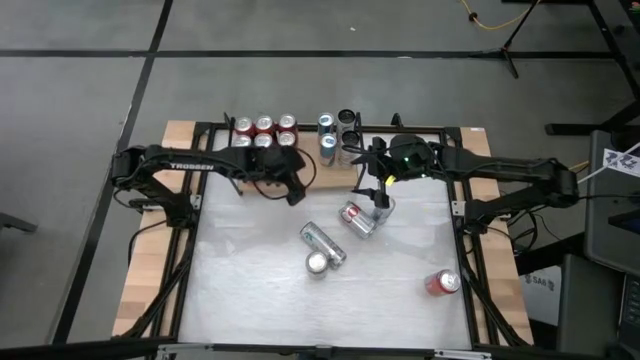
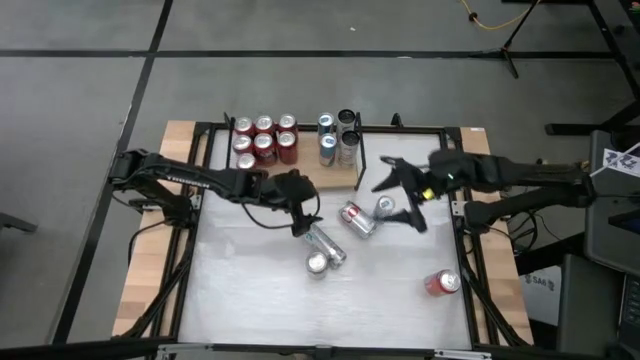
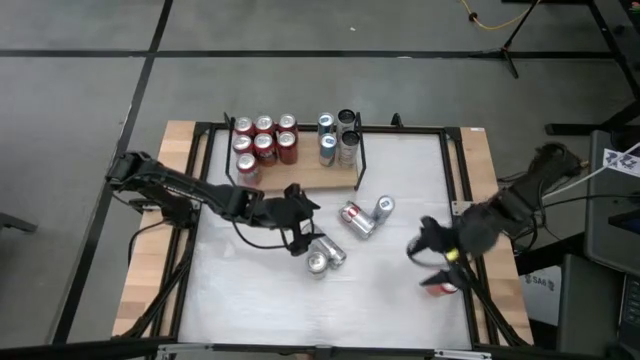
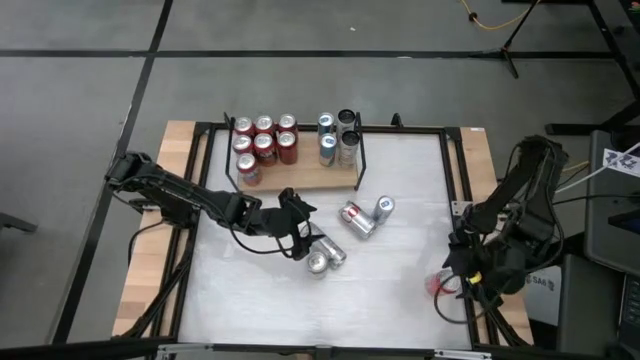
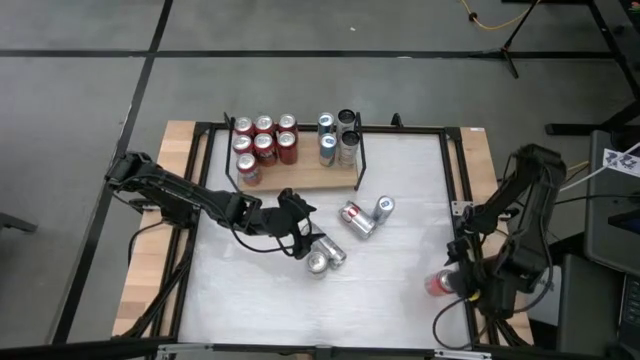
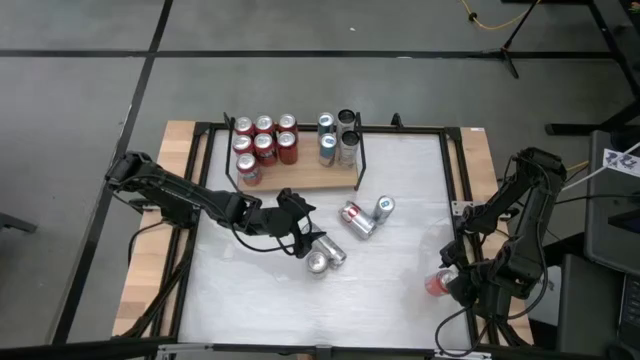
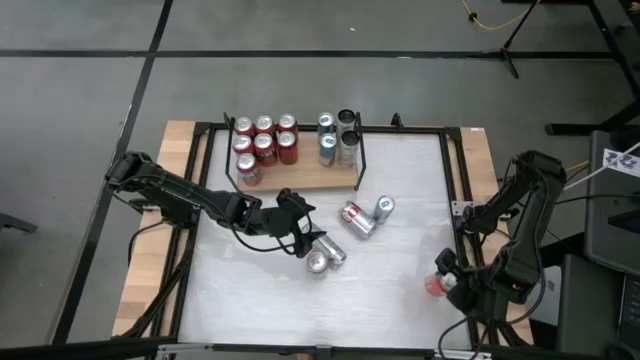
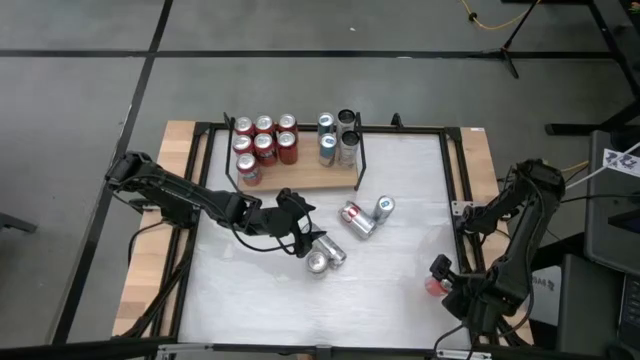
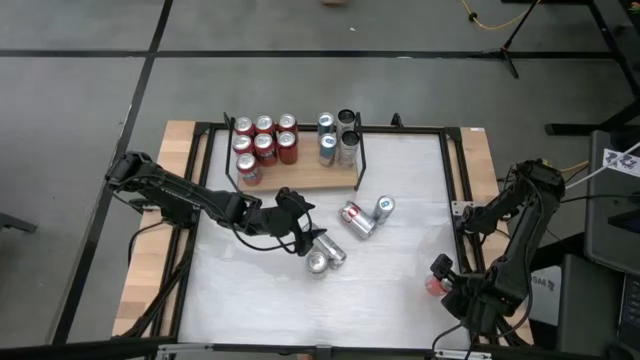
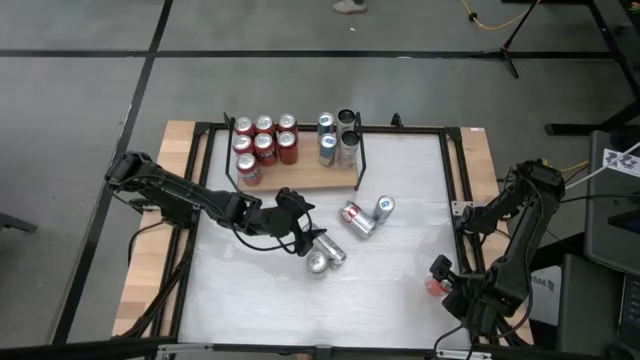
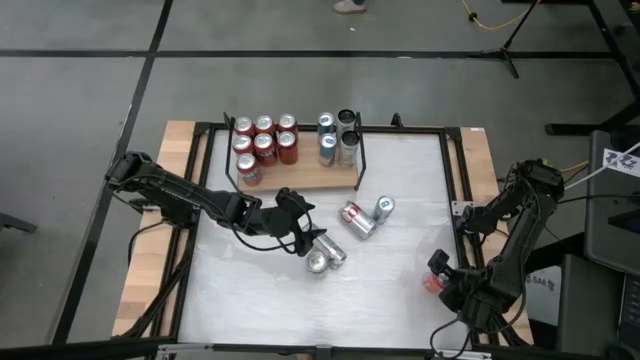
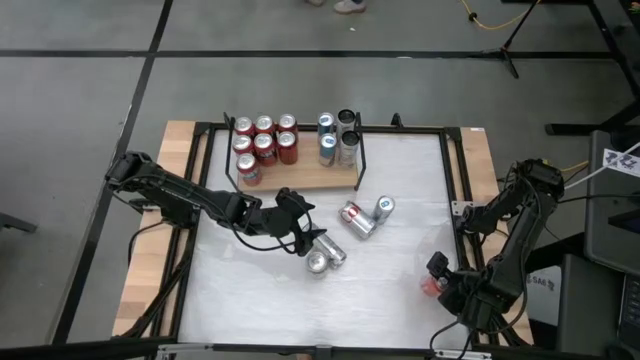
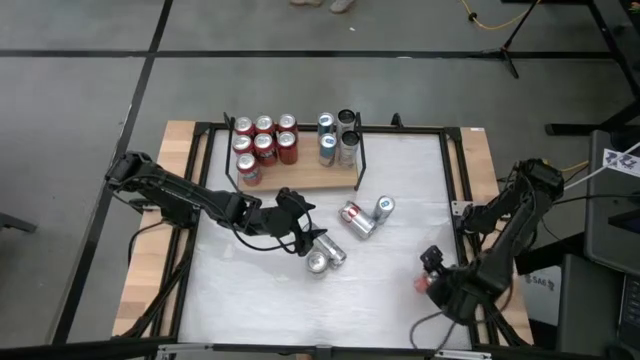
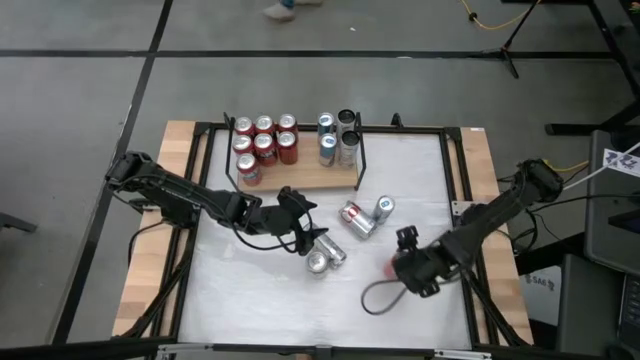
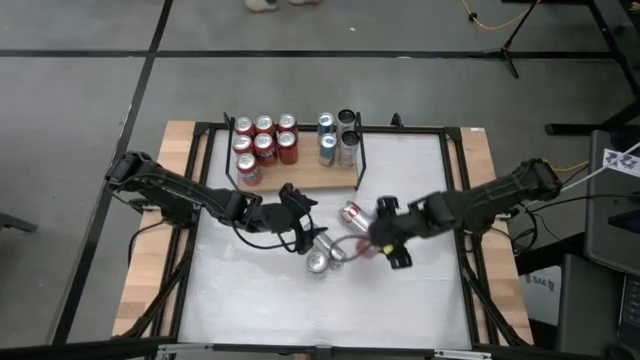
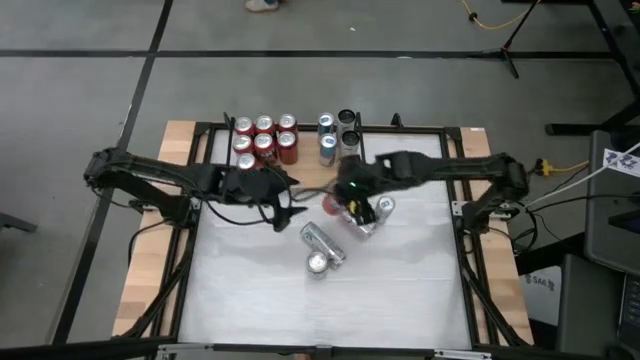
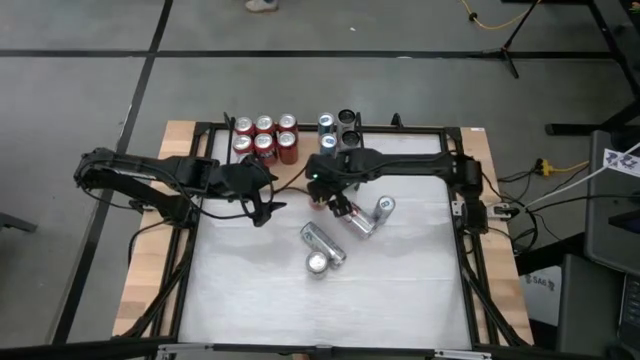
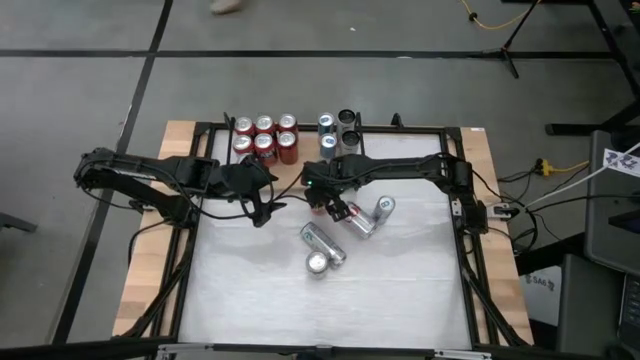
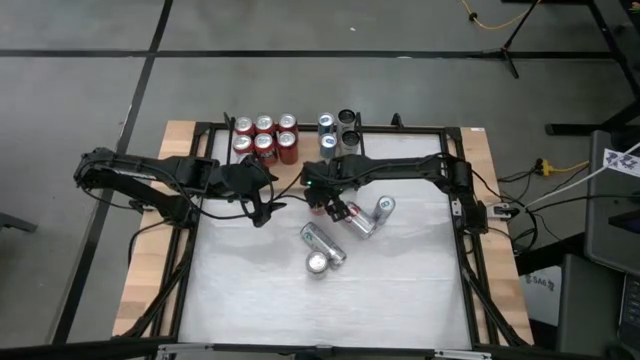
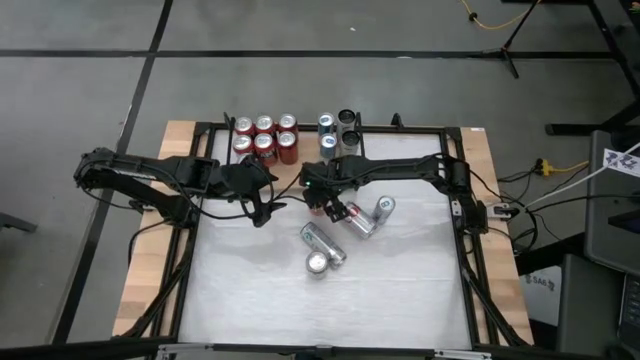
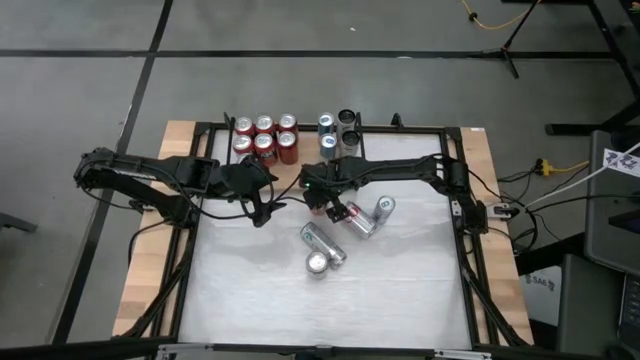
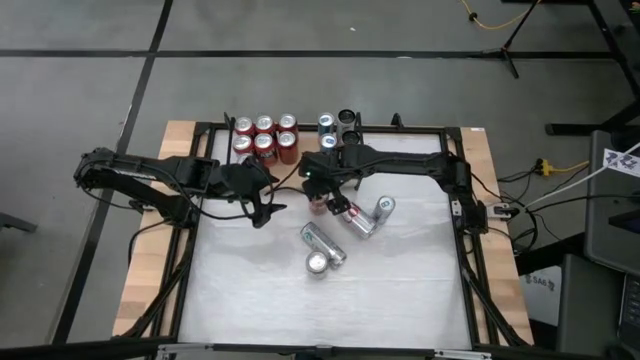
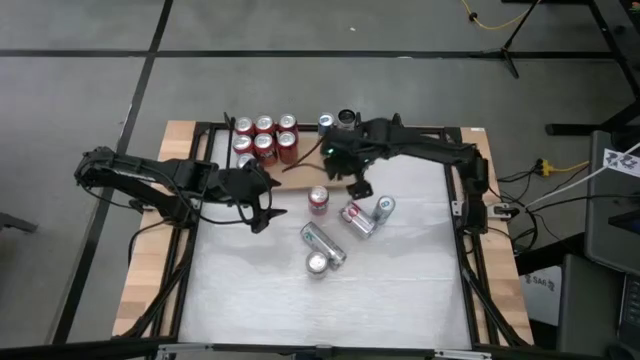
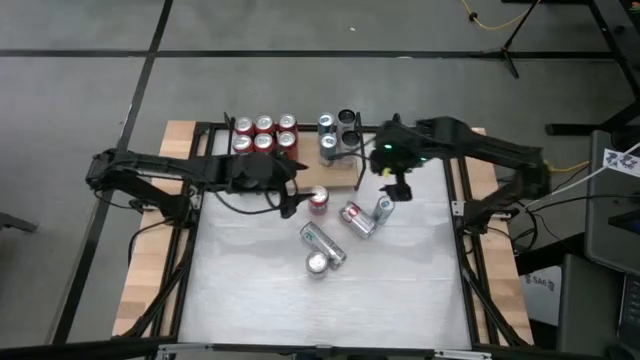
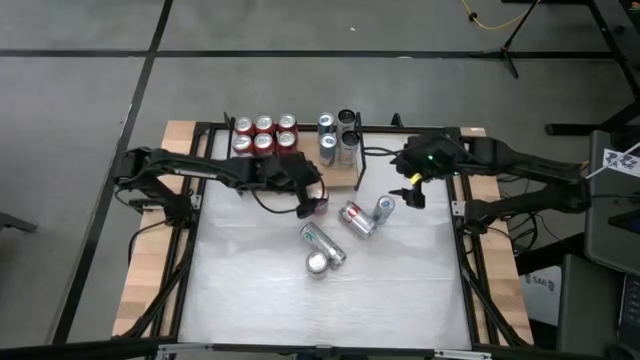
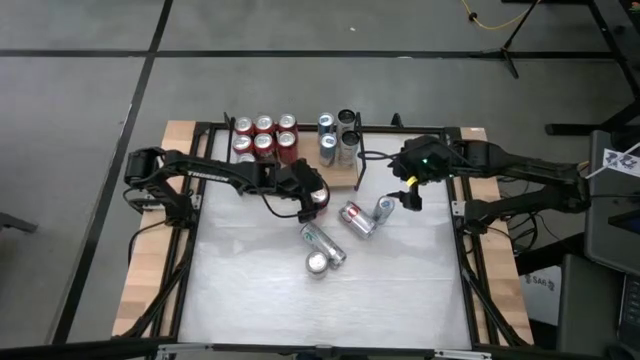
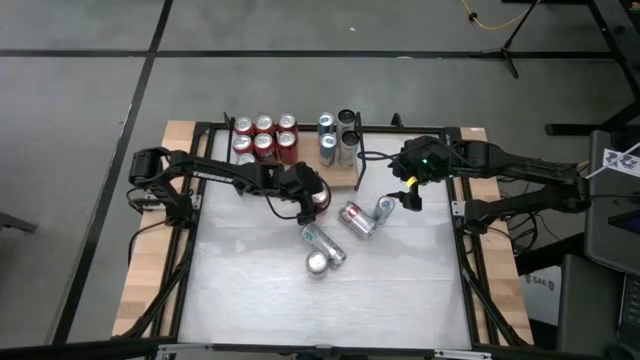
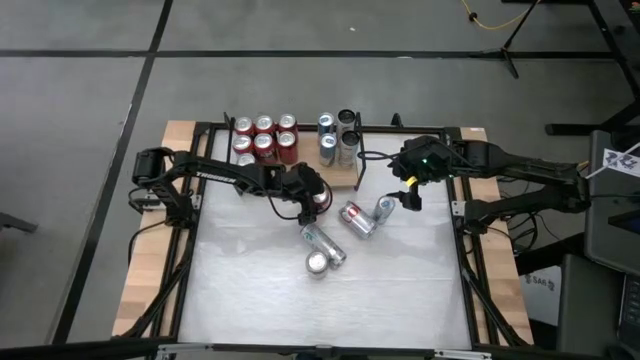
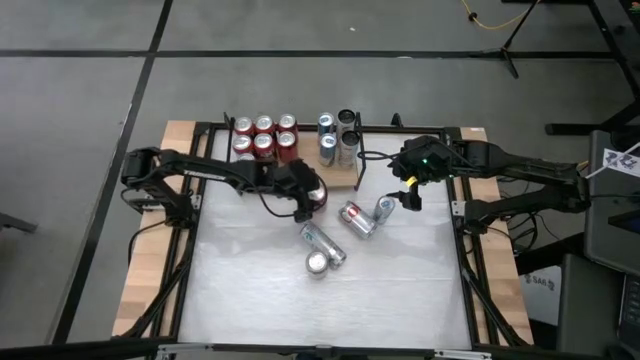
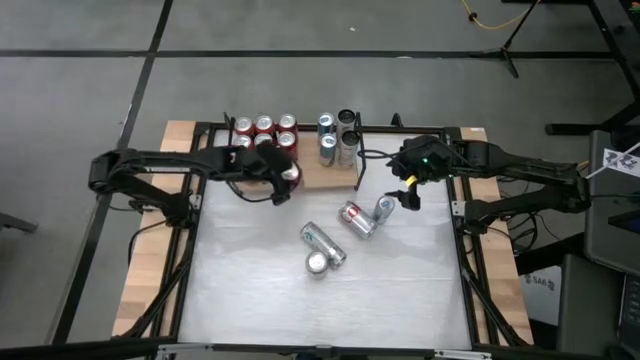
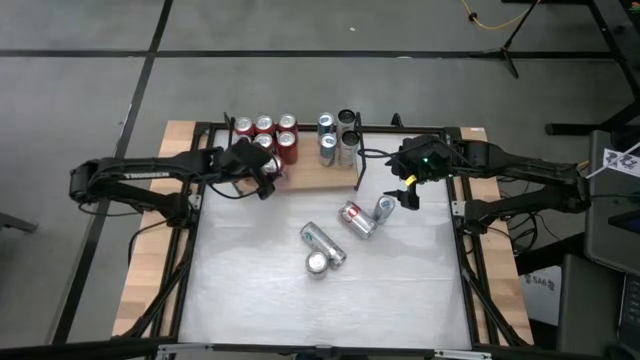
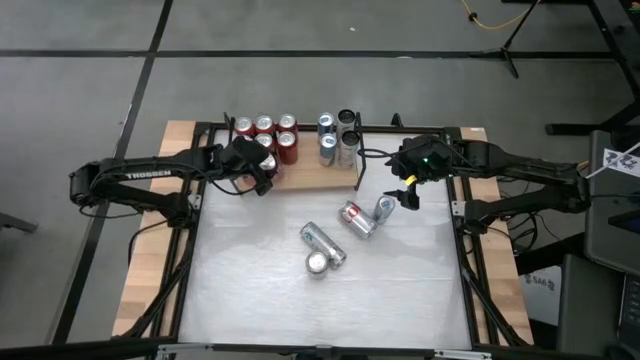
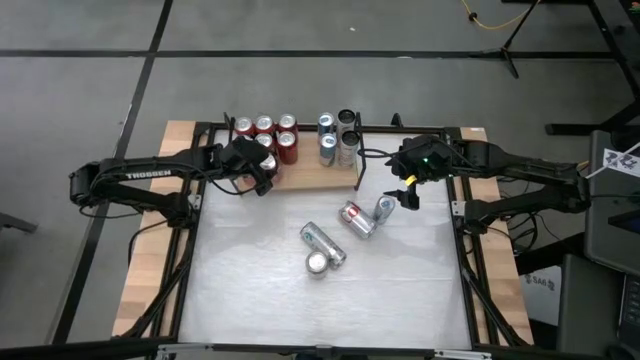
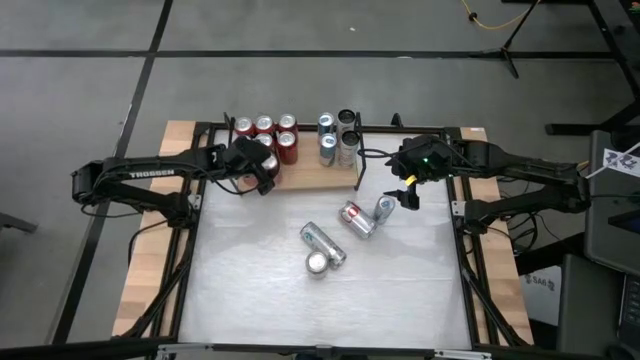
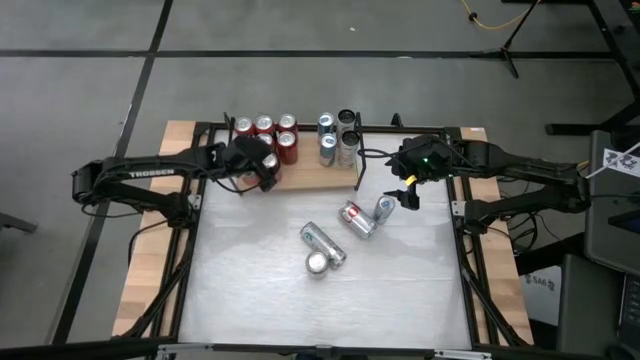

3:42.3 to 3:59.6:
Task: Place canned beverage on shelf
Put the red soda can on the shelf aligned with the other red soda cans

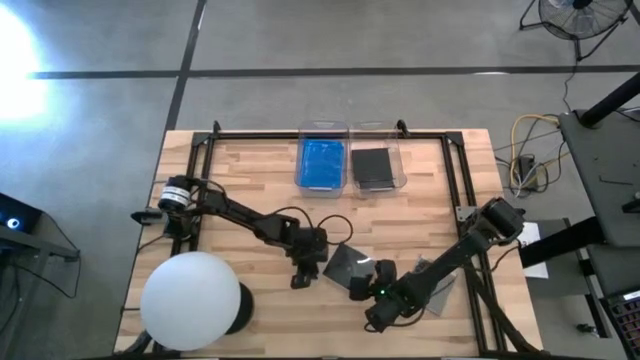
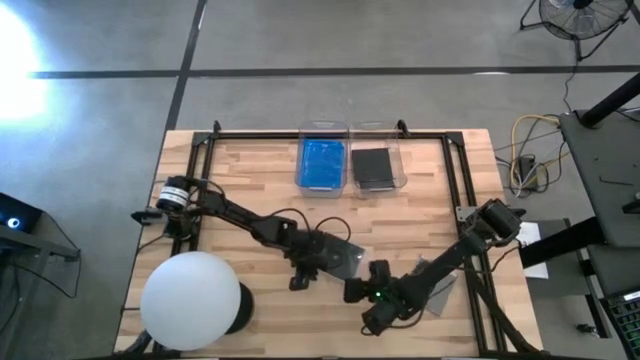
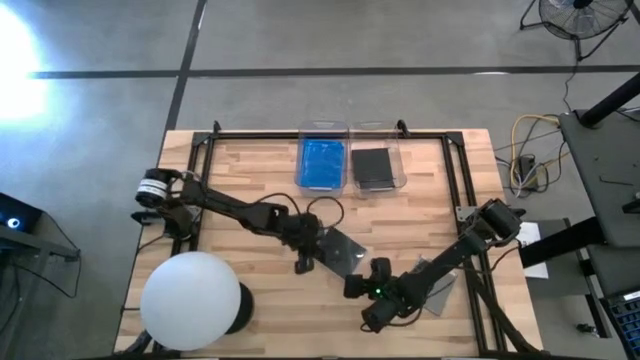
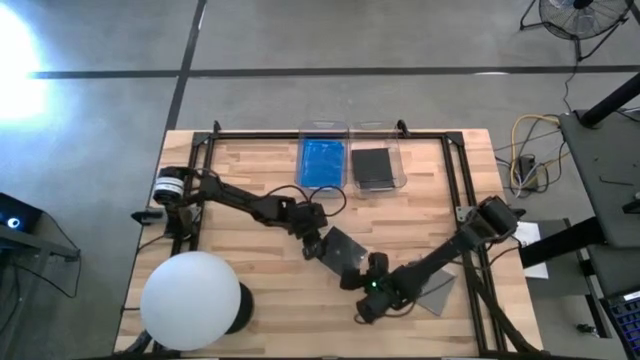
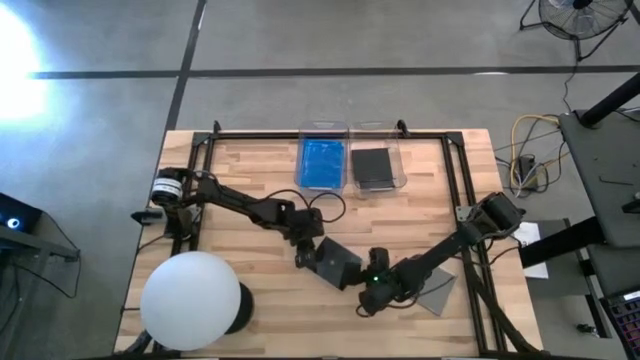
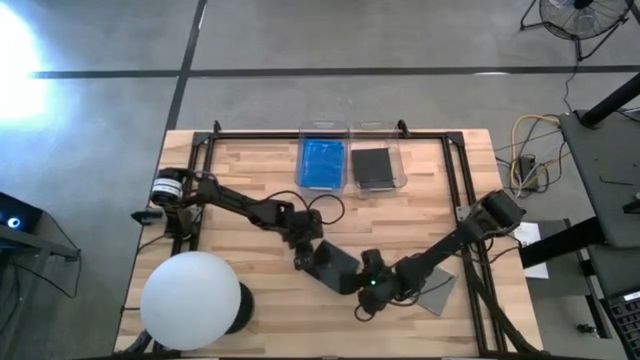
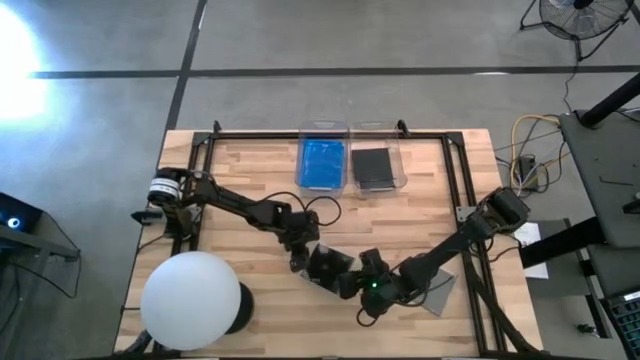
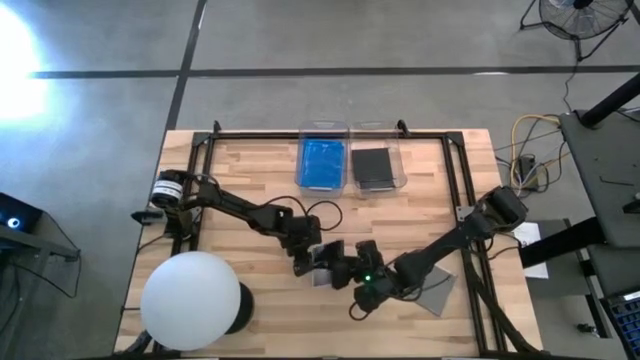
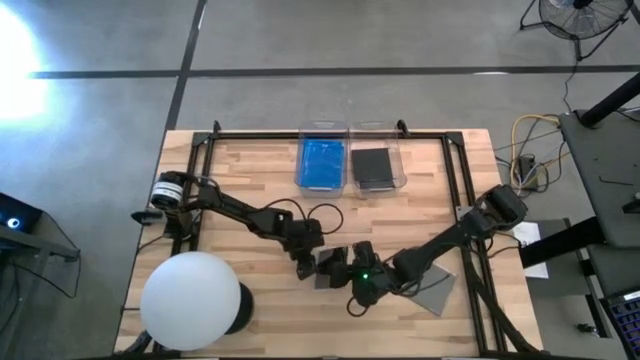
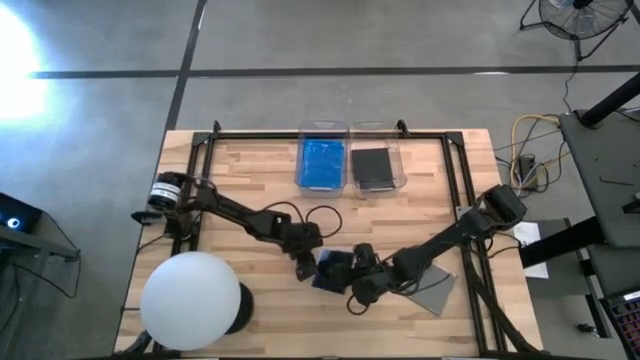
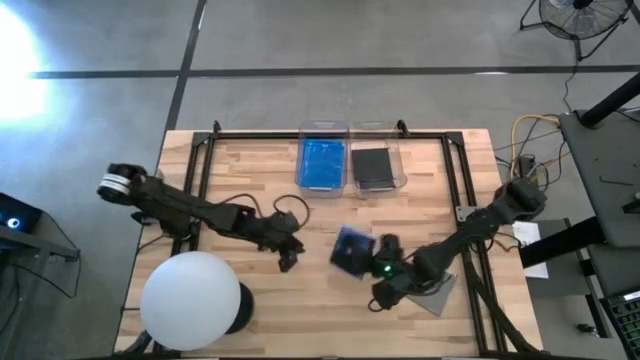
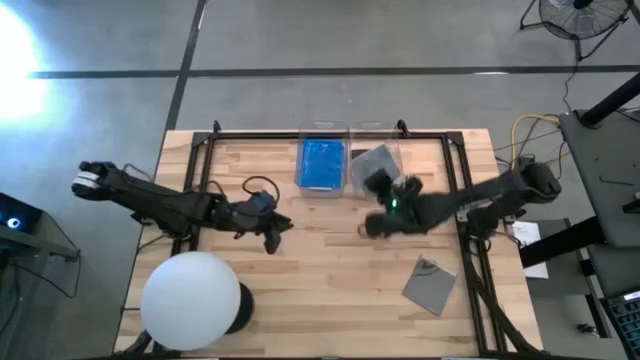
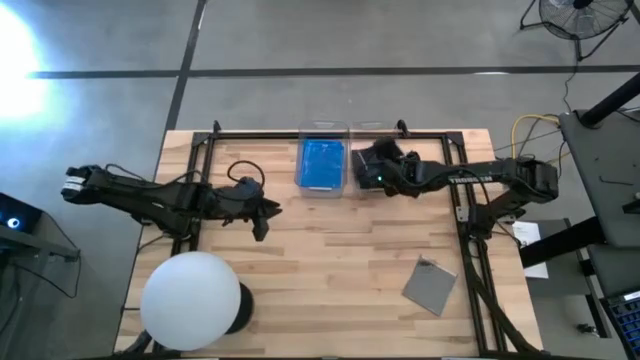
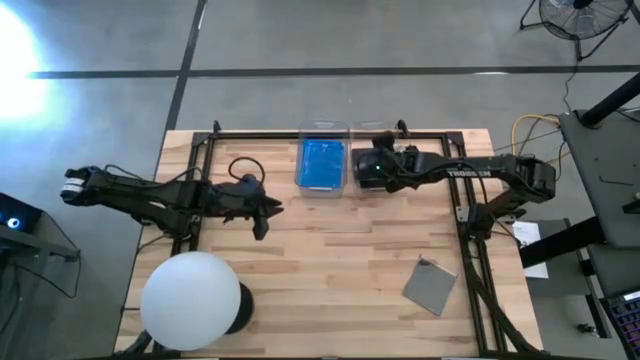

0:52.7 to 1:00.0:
Task: Pick & place jewel cases by type
Put the black CD case into the right transparent bin
